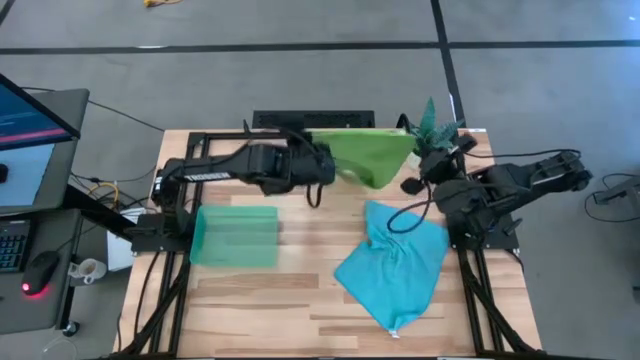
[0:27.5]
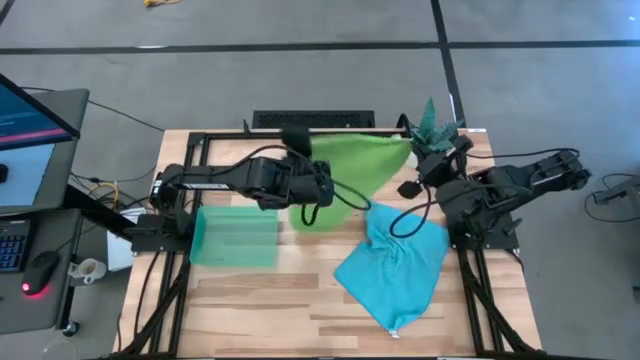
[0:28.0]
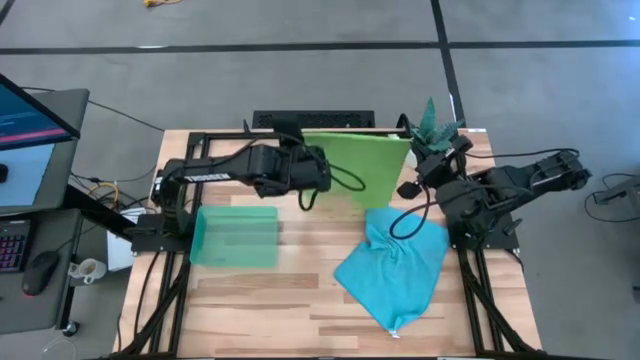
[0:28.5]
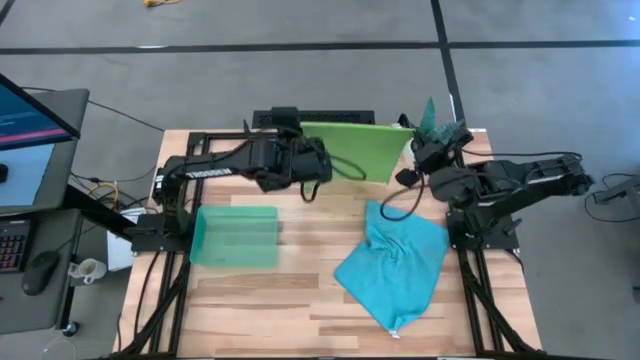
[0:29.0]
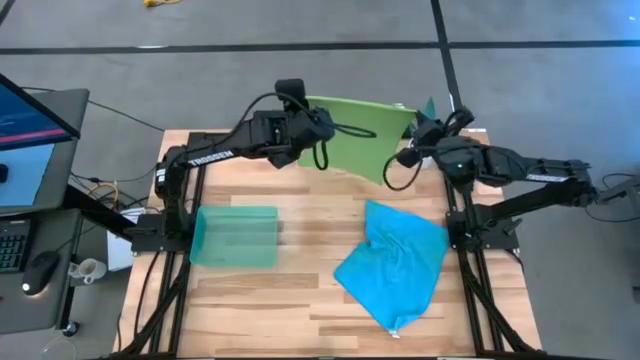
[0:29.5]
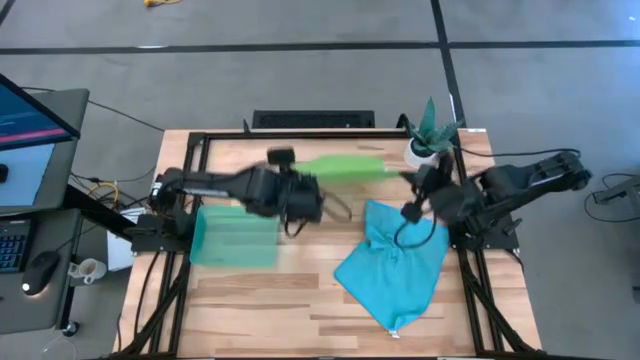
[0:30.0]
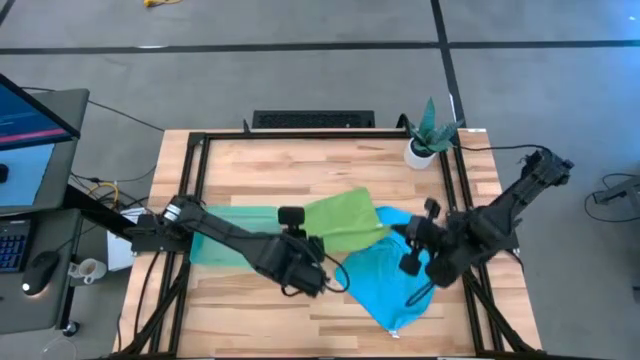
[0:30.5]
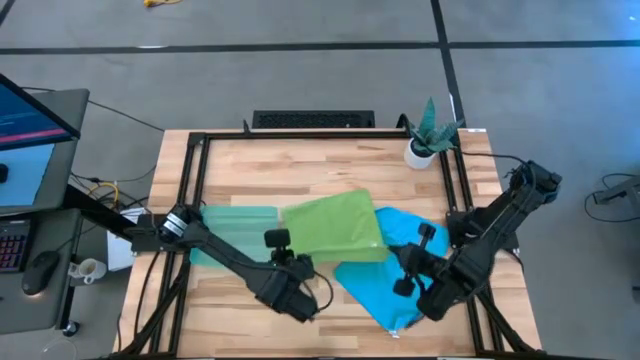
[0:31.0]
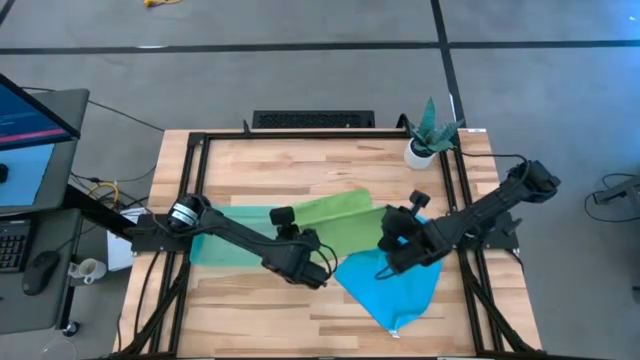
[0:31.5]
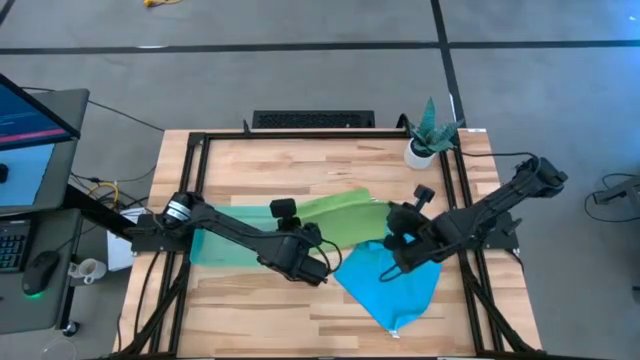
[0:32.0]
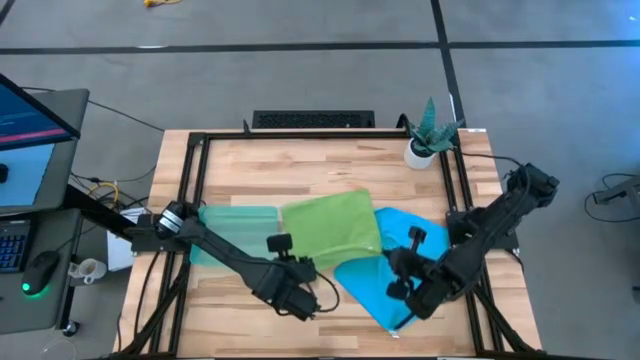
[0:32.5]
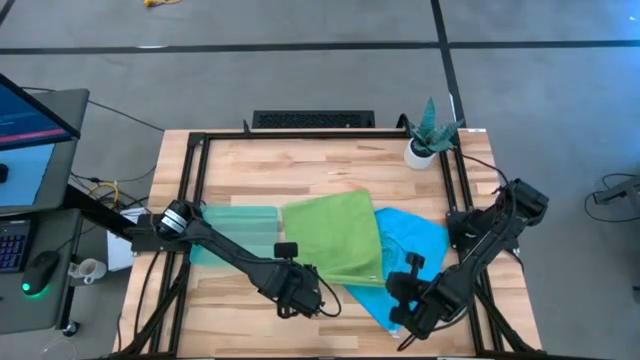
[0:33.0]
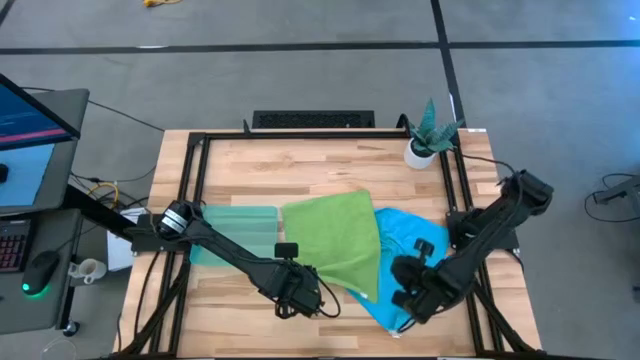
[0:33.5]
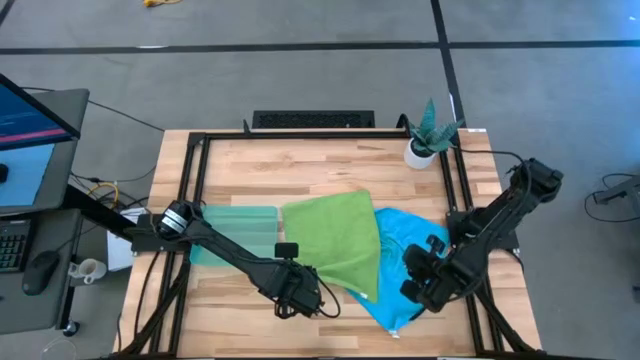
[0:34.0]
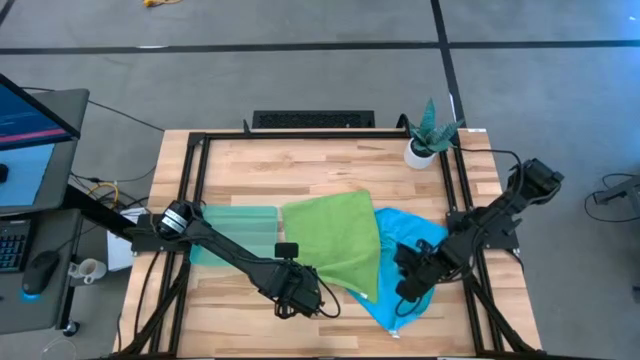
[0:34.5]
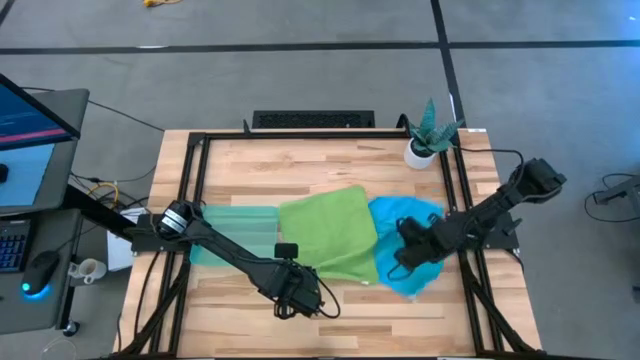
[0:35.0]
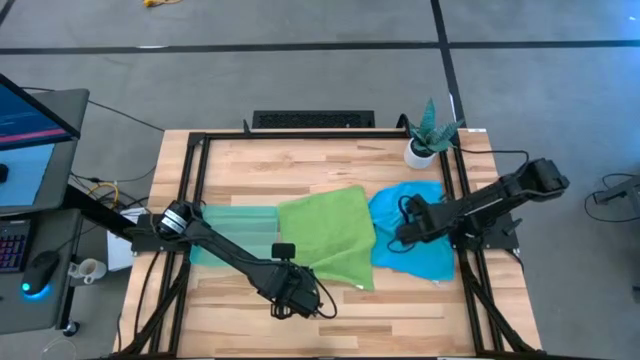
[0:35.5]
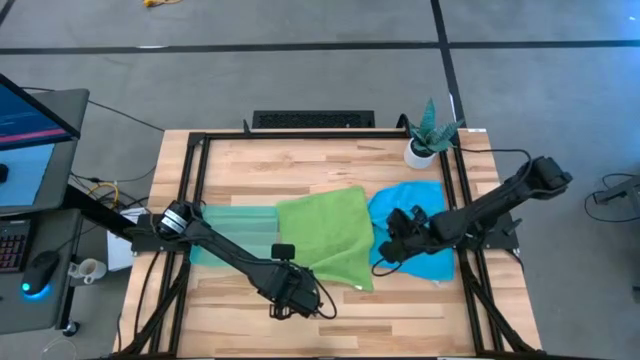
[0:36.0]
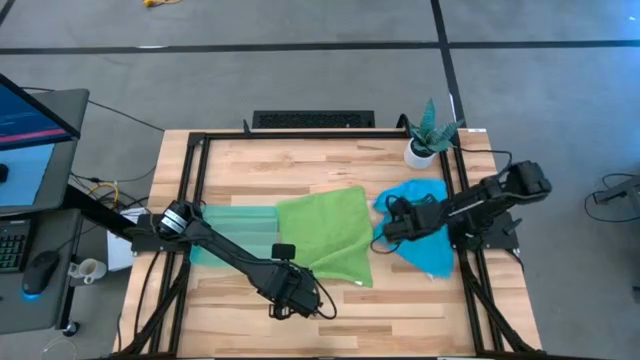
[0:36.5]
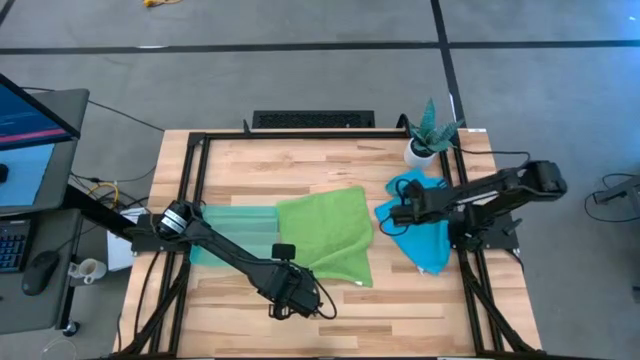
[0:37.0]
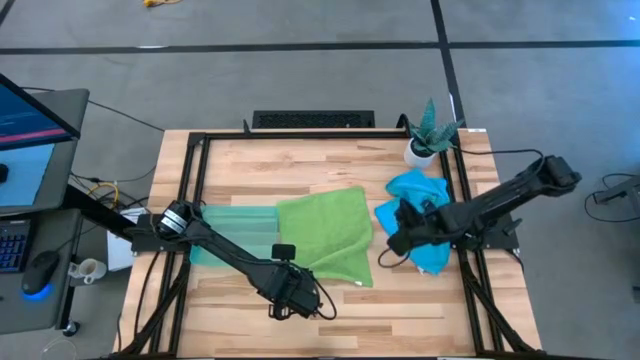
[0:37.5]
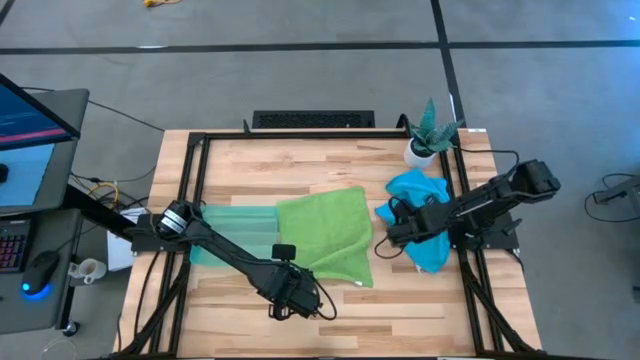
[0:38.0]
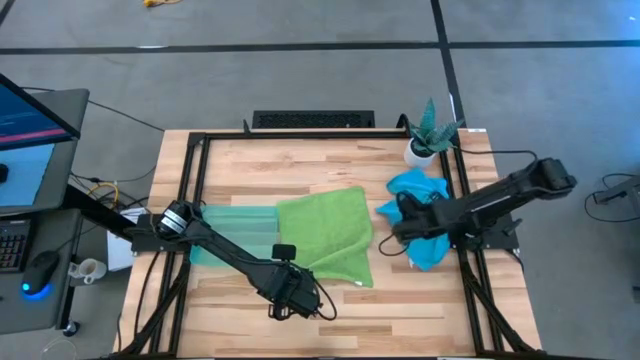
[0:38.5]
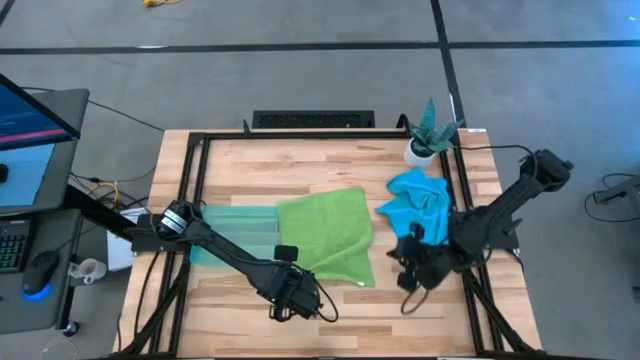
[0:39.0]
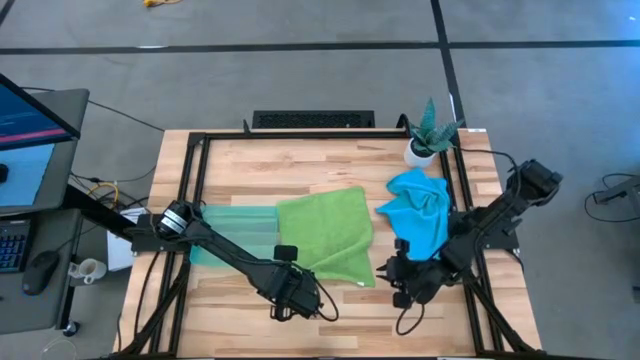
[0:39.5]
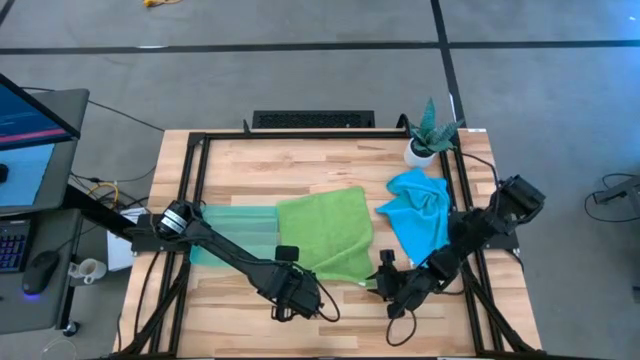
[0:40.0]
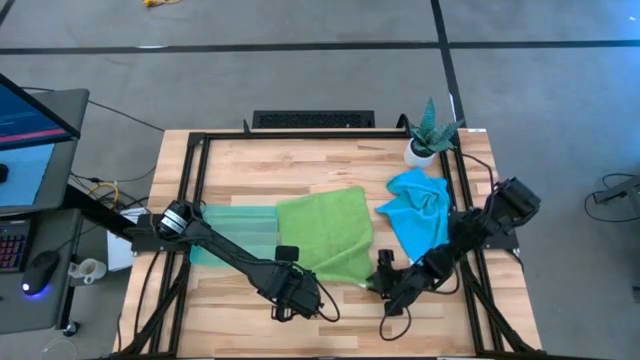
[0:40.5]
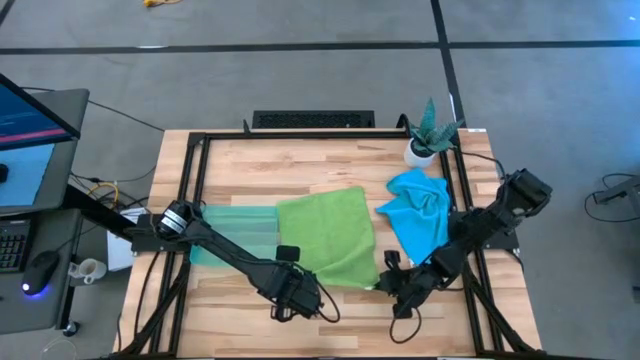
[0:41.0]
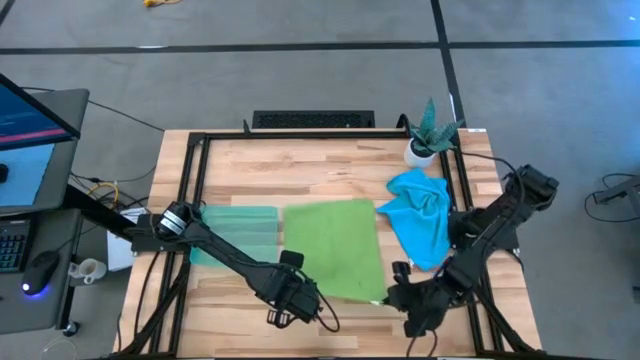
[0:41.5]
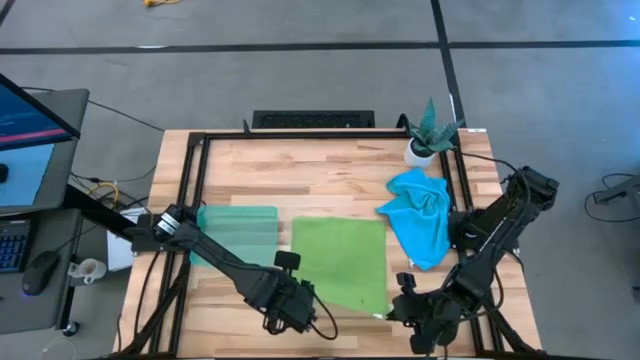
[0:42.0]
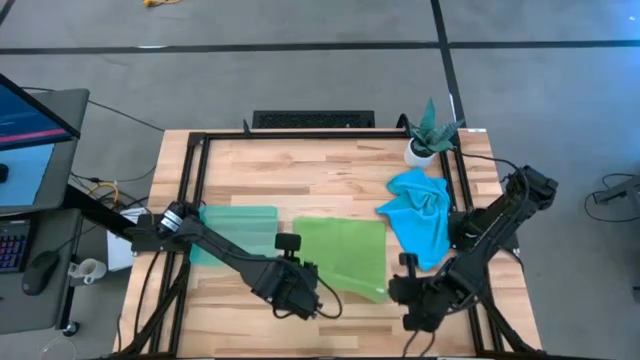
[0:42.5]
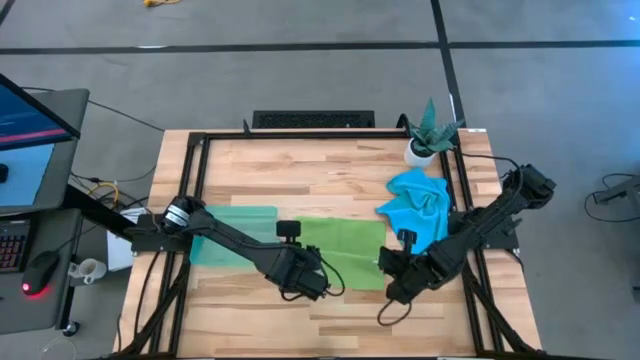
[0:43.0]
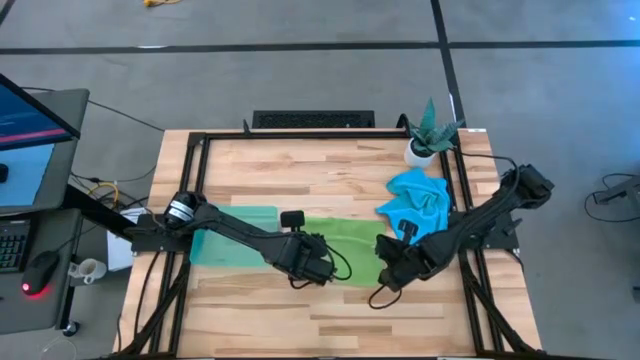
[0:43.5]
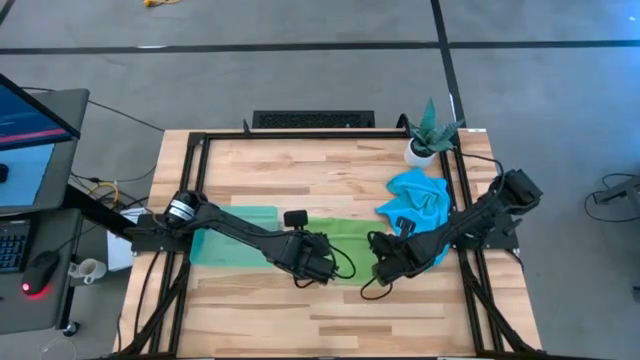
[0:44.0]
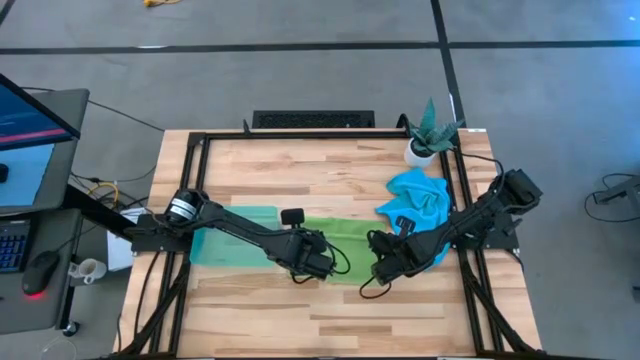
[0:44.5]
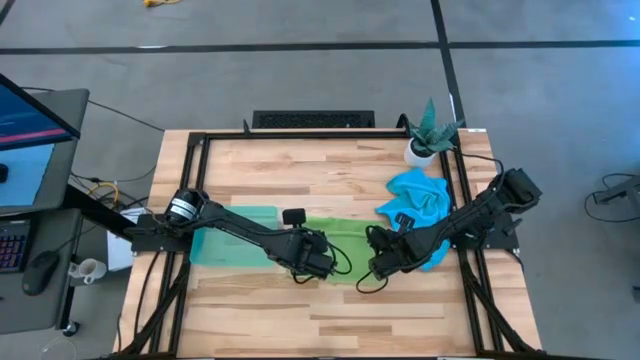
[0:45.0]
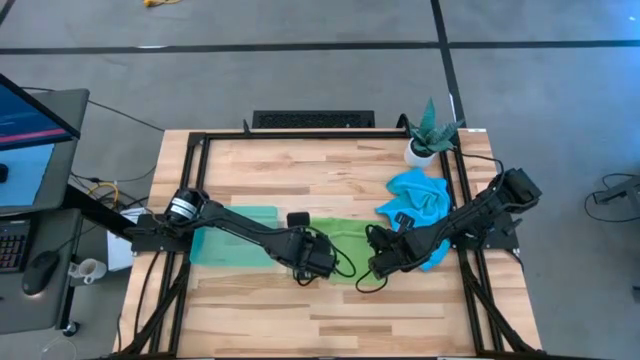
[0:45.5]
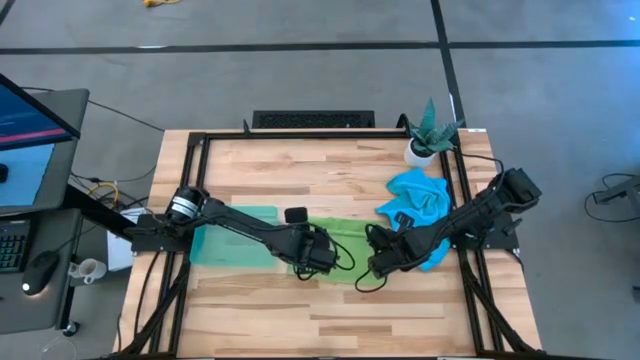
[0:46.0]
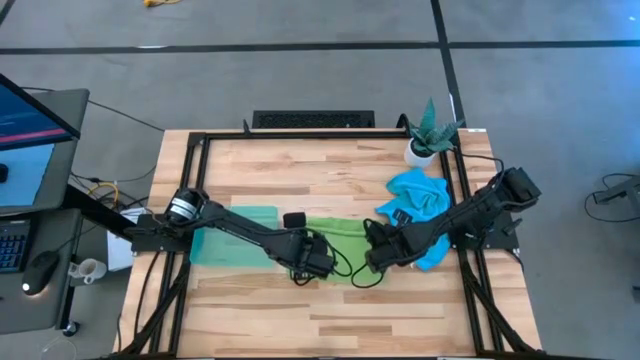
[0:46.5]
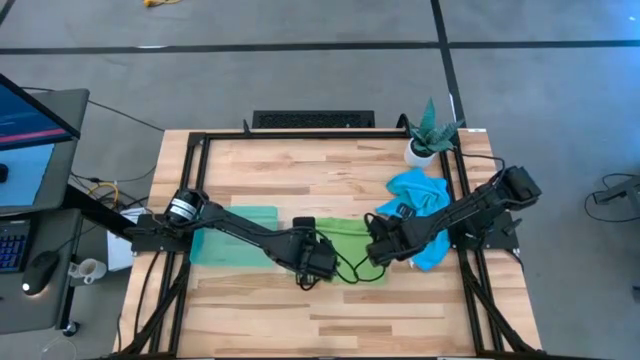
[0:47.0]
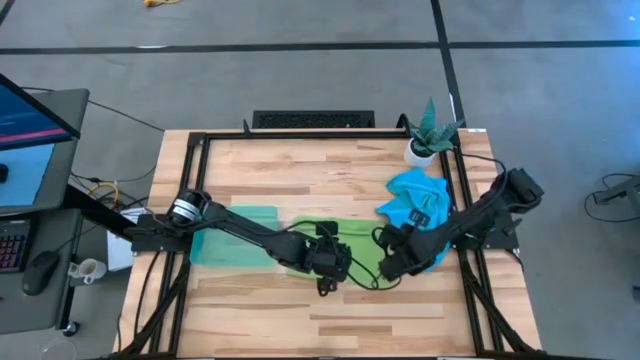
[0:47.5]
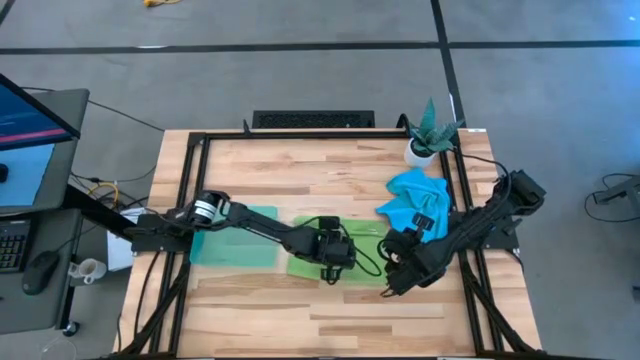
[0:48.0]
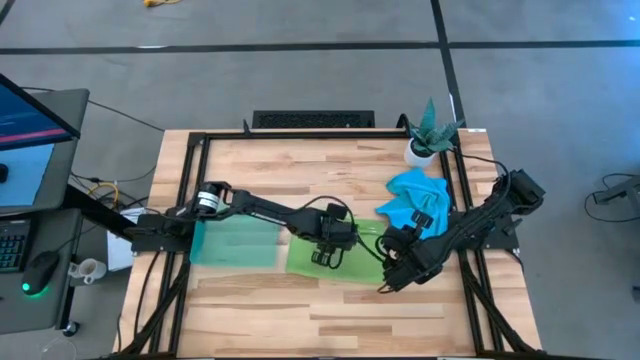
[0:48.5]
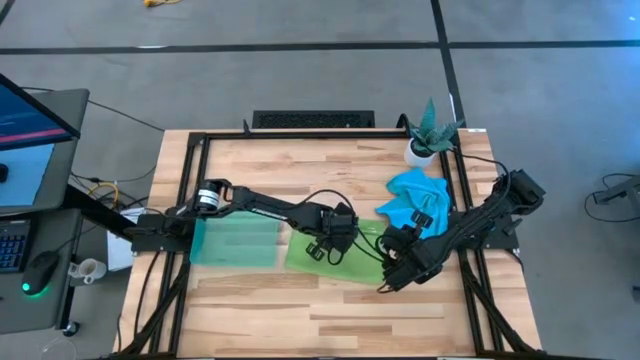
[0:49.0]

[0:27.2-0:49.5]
Task: Roll microfiber towels into tight, uniform cylinder then place into a basket
Fold the green towel
